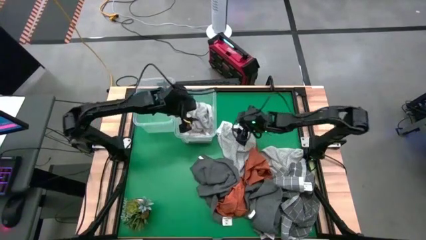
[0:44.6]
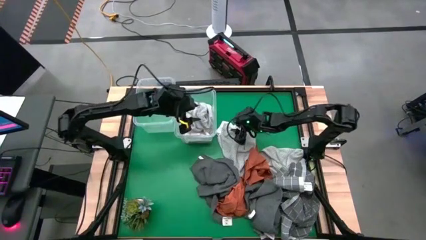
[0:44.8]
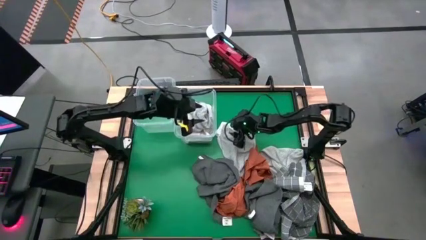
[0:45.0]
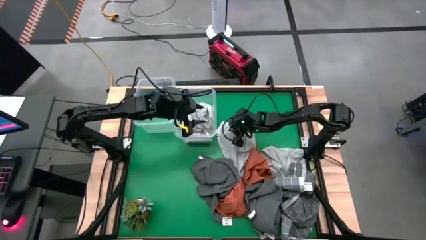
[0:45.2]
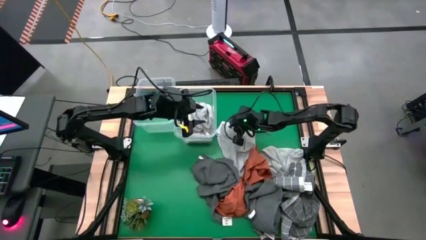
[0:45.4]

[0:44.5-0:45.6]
Task: Sort towels by color in basket
Put the white towel into the right transparent bin

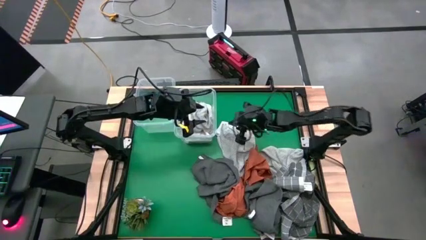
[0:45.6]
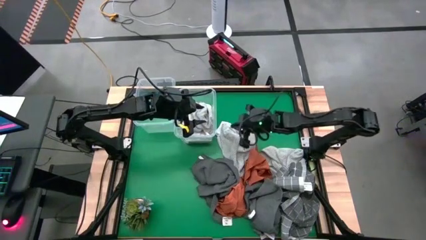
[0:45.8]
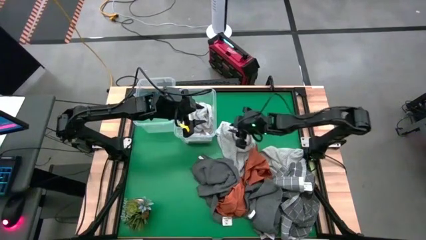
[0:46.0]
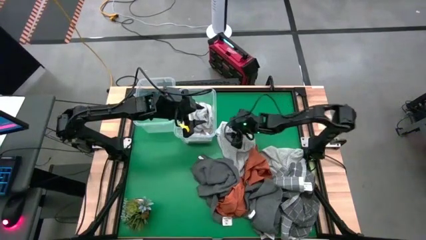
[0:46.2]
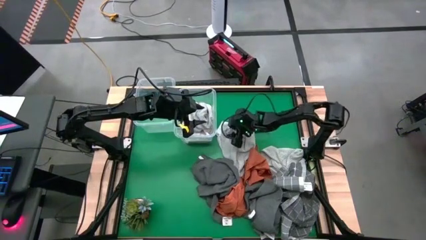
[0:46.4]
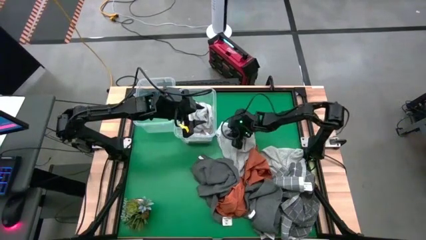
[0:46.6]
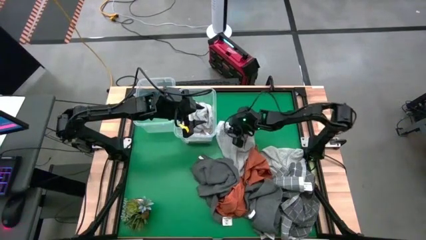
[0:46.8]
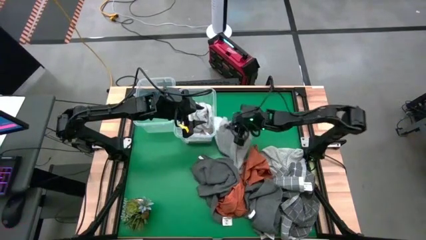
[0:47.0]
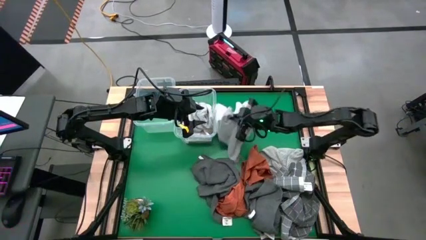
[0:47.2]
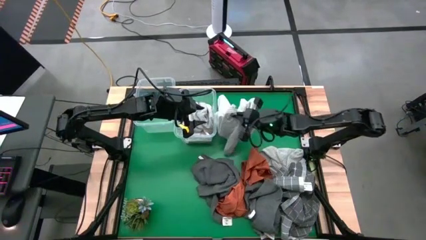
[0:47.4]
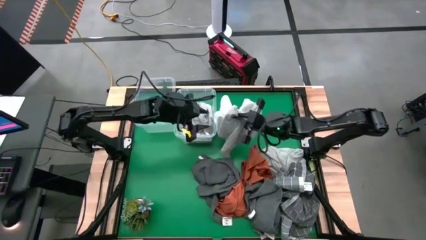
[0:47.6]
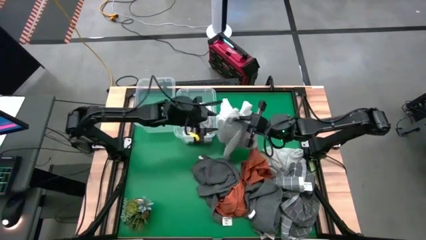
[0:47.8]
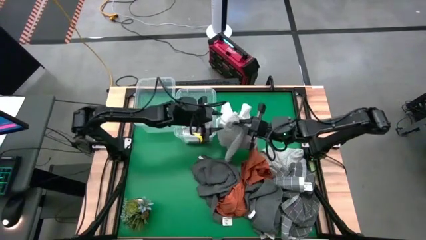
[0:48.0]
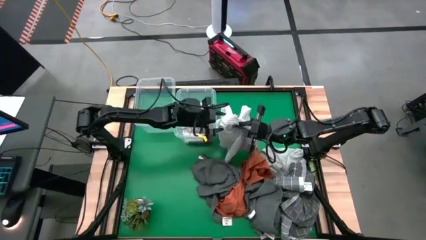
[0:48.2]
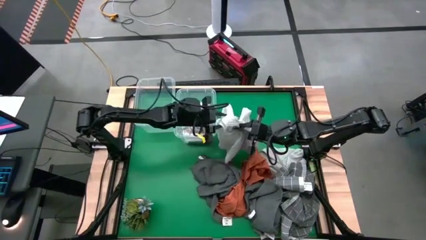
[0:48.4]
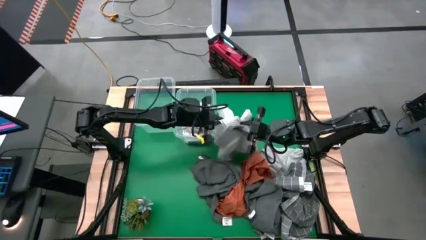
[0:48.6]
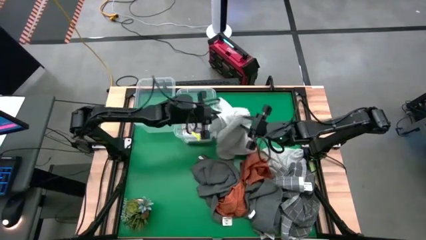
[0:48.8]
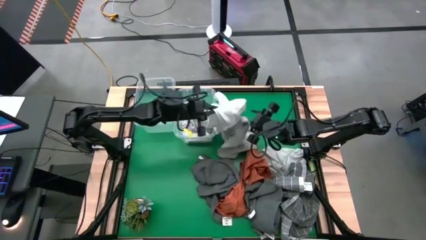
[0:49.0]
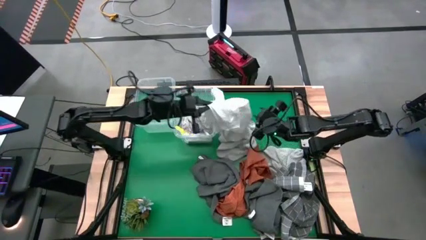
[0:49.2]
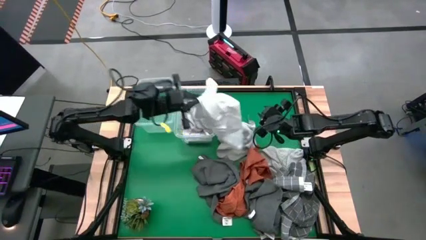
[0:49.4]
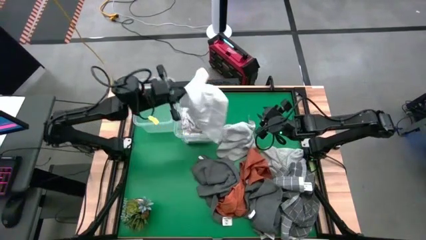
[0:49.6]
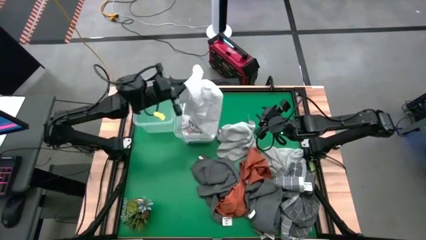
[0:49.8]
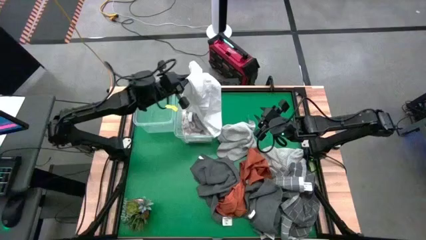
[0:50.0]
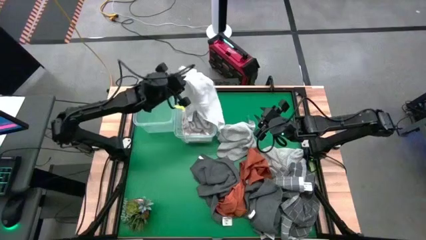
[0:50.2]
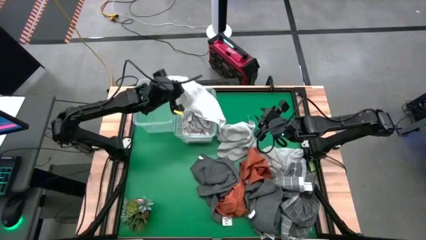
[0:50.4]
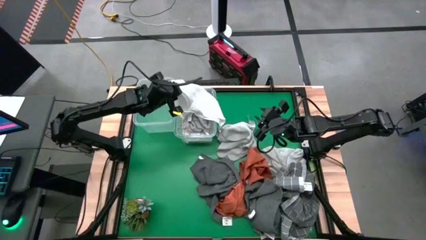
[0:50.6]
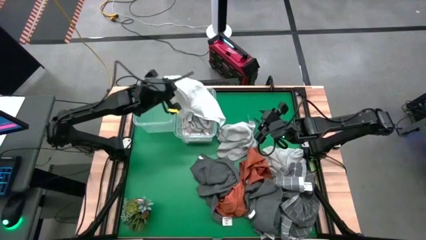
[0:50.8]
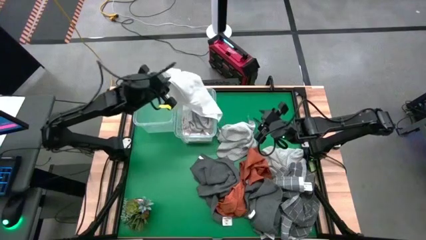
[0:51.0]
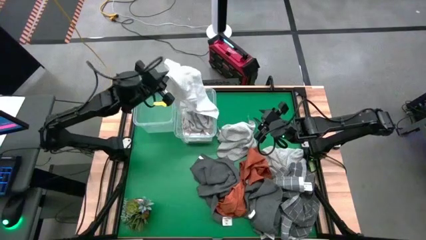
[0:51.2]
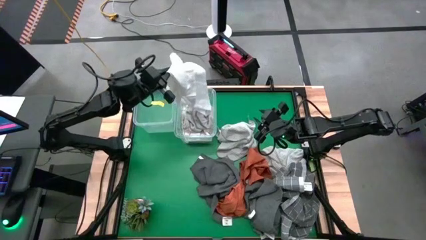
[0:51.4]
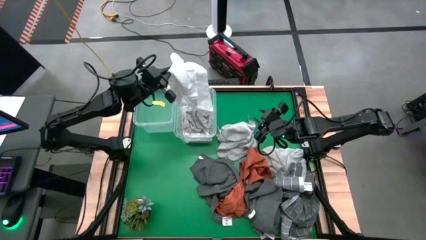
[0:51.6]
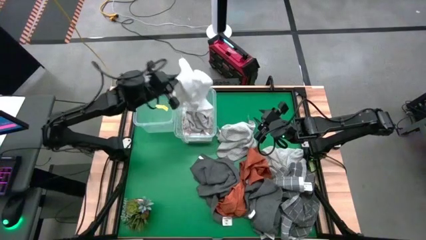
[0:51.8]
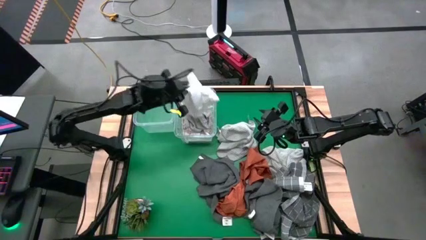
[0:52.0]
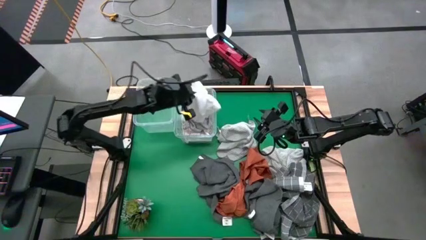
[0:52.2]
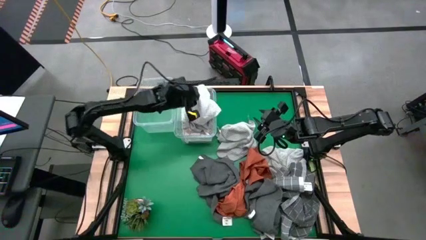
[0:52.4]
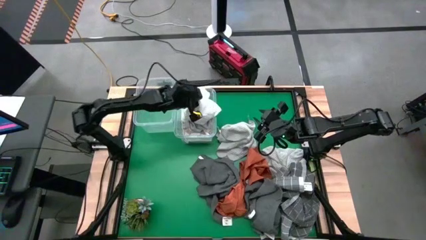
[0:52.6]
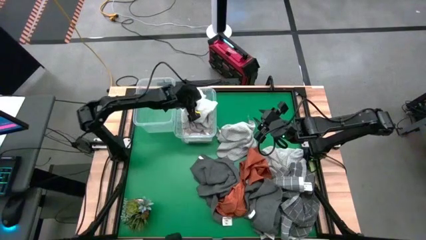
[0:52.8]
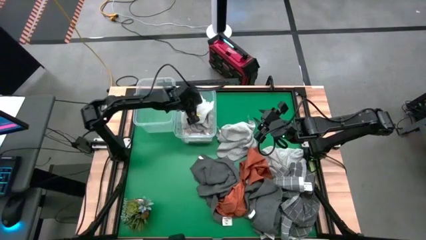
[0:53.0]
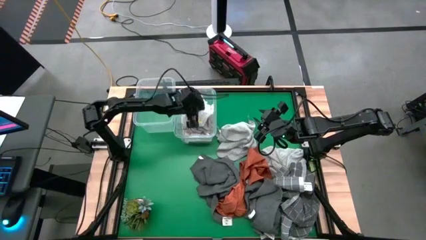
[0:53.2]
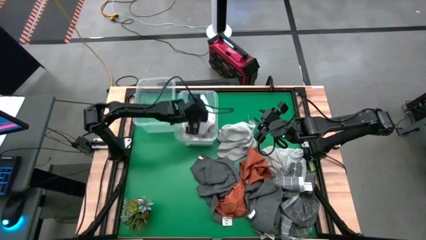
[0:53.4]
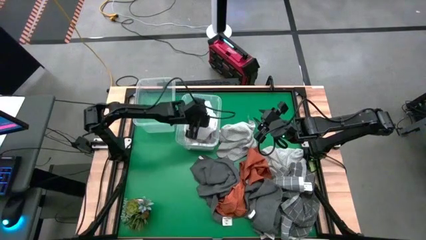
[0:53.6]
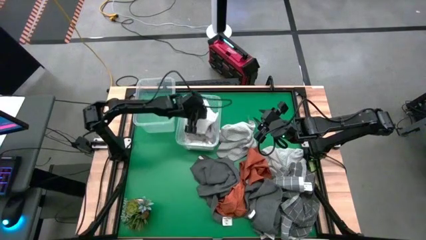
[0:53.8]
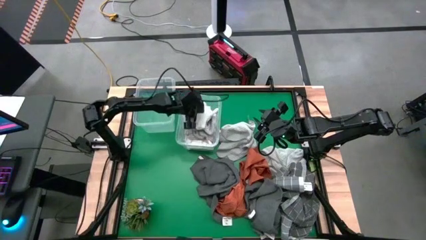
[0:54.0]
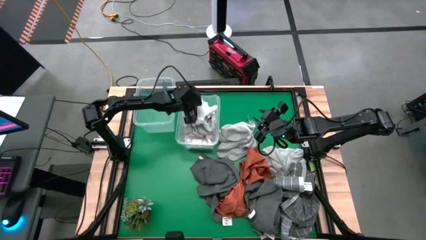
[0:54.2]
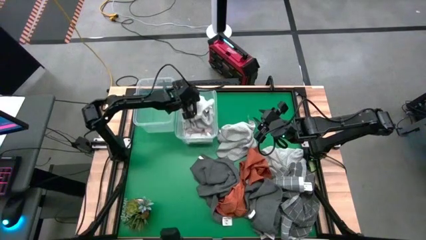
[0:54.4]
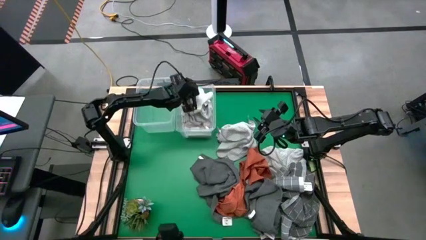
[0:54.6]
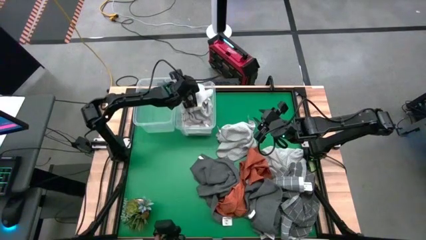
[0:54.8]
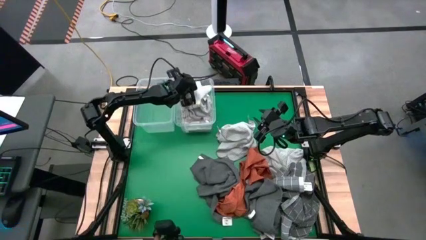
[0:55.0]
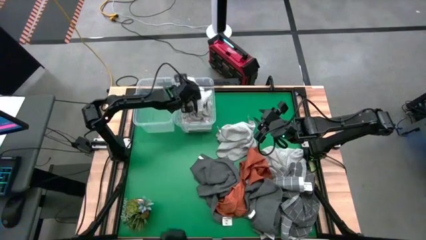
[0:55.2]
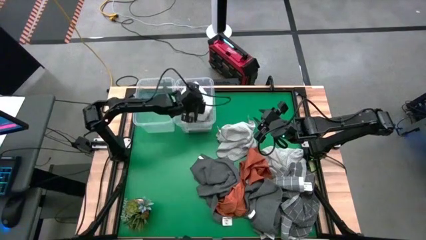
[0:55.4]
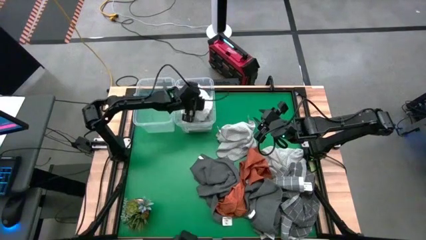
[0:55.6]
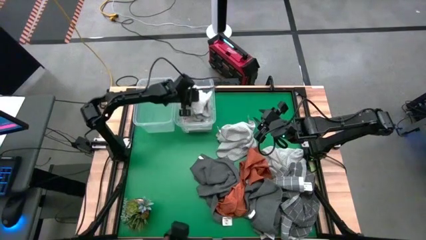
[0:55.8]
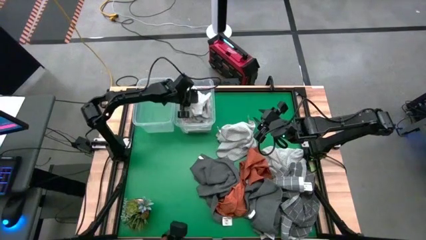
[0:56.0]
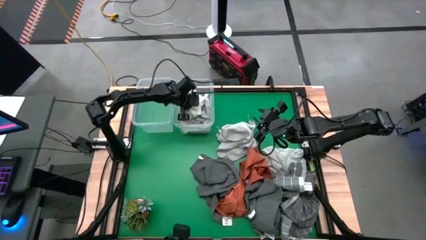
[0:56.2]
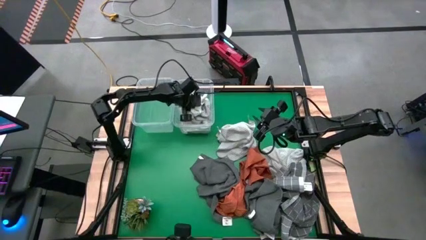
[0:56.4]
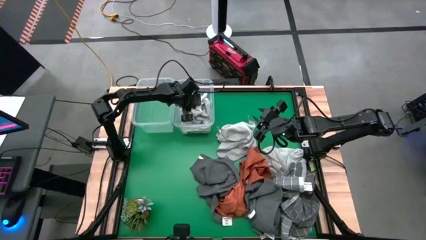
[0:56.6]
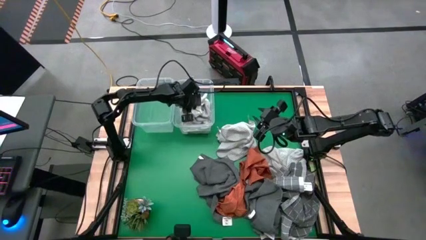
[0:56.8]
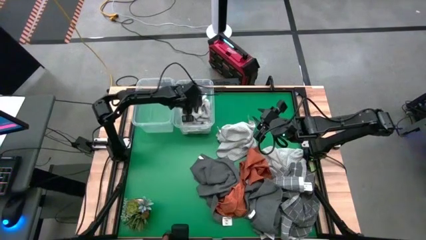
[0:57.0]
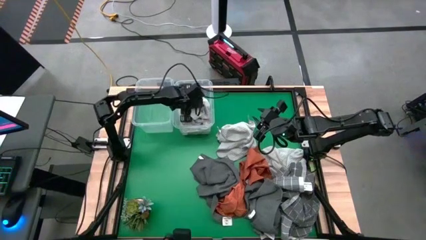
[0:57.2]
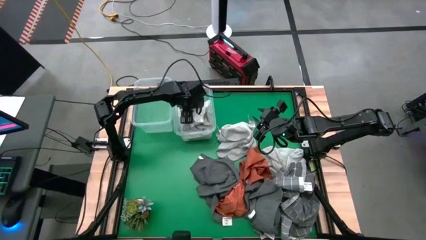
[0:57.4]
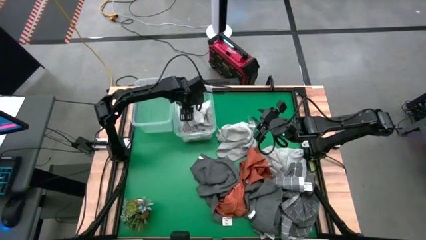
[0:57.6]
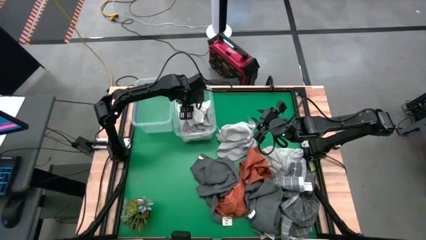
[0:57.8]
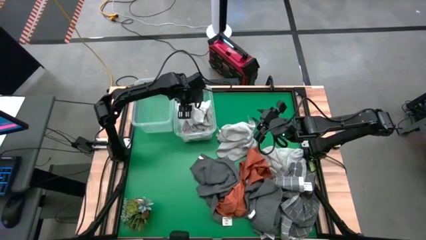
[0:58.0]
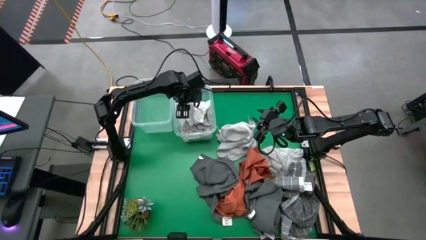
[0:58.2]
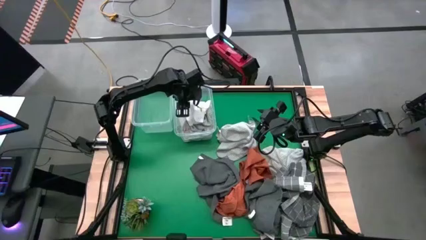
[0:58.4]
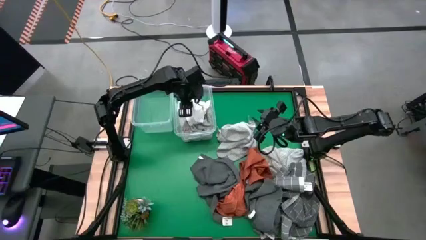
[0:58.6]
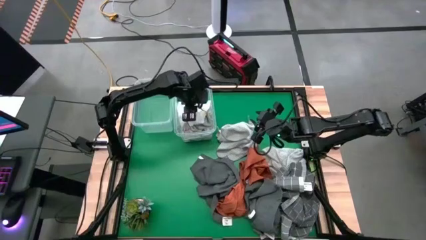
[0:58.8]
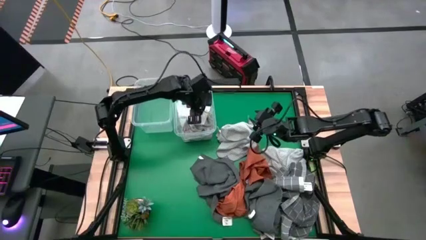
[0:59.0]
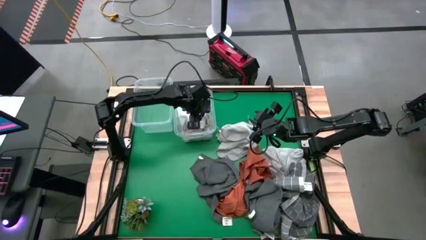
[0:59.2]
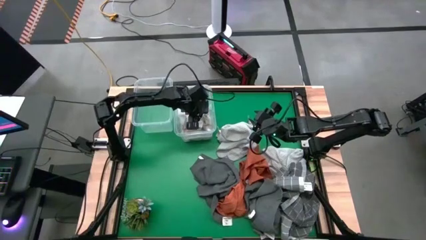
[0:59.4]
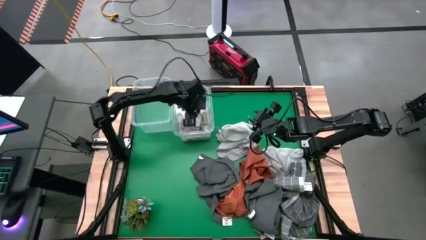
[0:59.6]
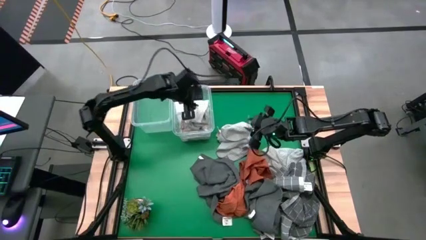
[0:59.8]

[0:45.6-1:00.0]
Put the white towel into the right transparent bin
